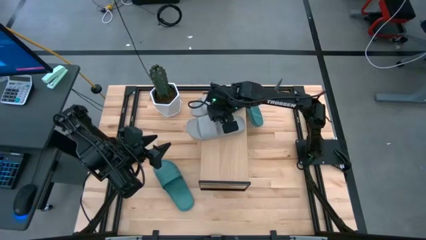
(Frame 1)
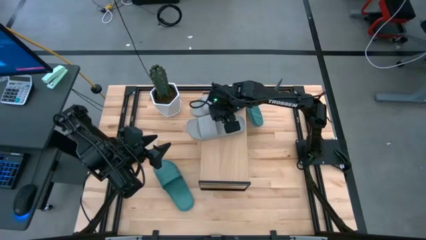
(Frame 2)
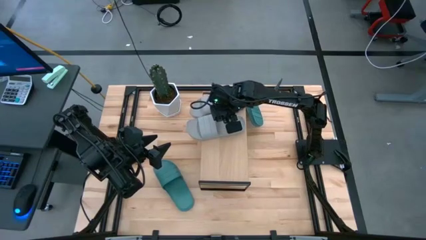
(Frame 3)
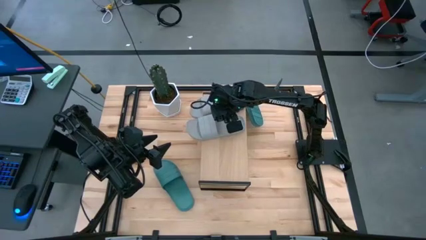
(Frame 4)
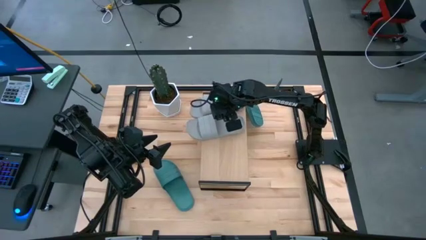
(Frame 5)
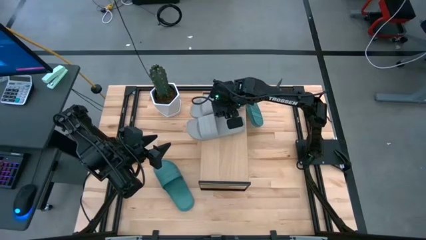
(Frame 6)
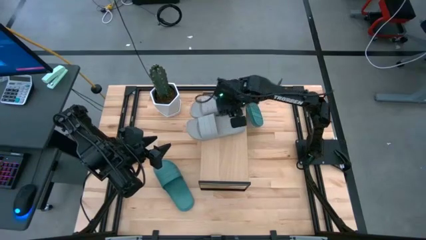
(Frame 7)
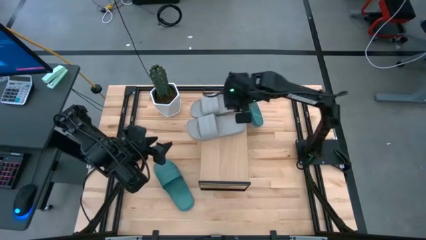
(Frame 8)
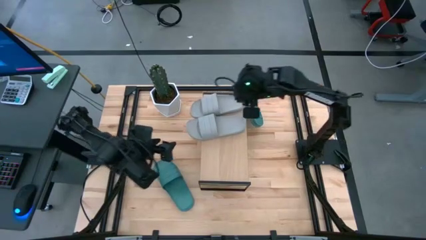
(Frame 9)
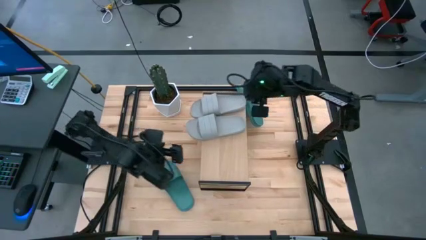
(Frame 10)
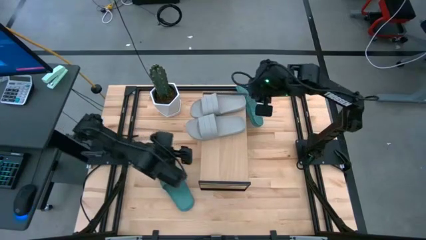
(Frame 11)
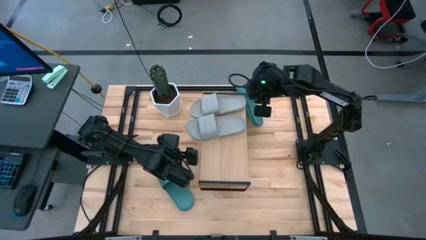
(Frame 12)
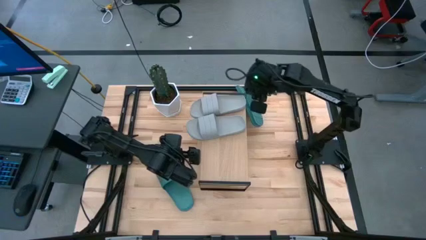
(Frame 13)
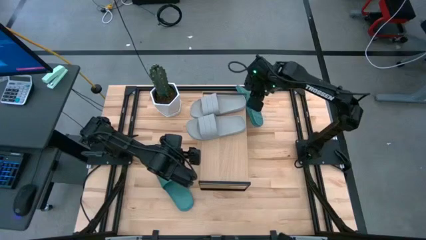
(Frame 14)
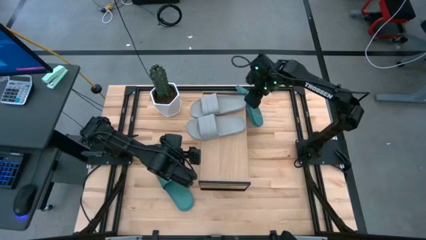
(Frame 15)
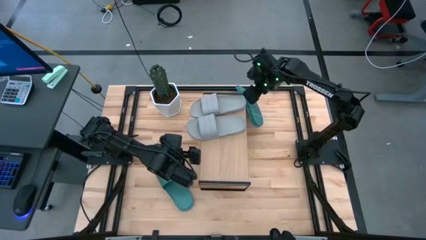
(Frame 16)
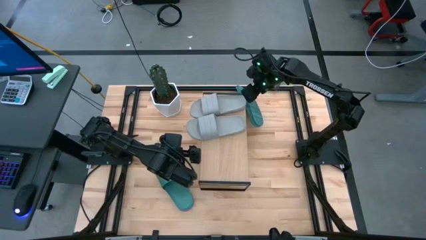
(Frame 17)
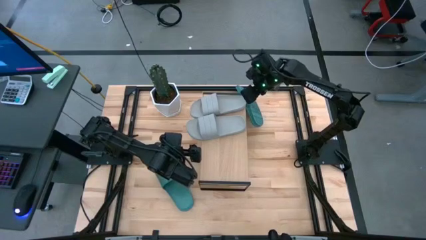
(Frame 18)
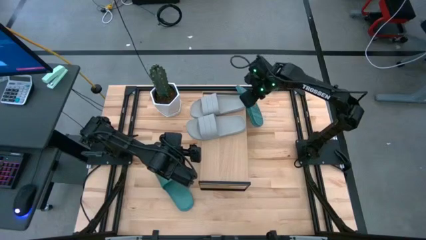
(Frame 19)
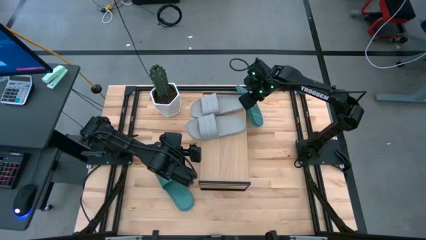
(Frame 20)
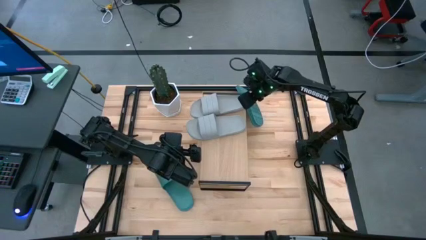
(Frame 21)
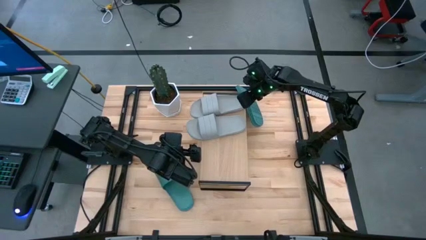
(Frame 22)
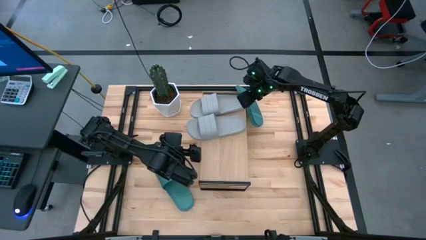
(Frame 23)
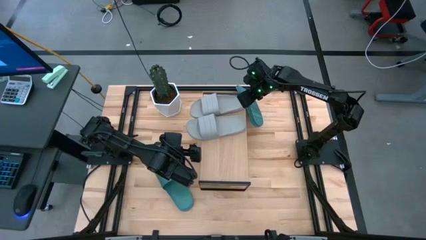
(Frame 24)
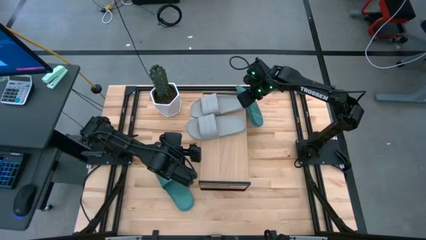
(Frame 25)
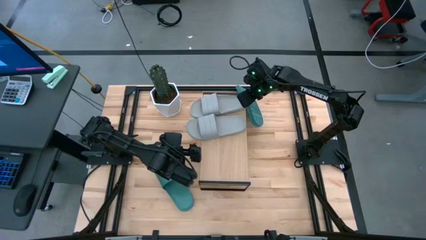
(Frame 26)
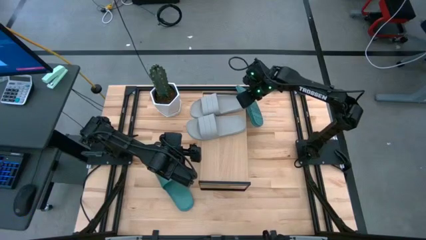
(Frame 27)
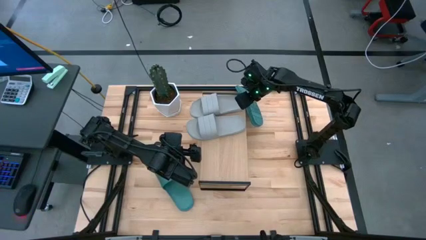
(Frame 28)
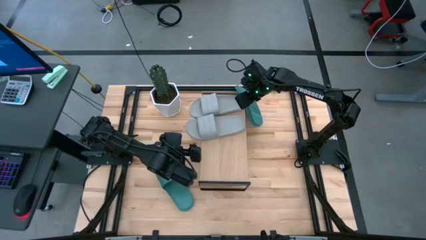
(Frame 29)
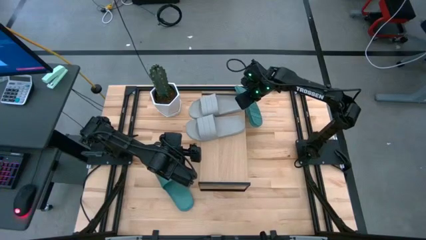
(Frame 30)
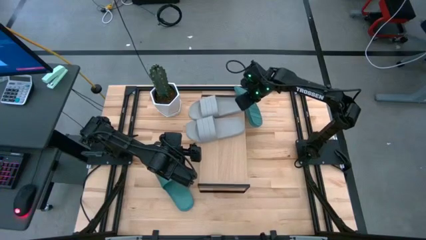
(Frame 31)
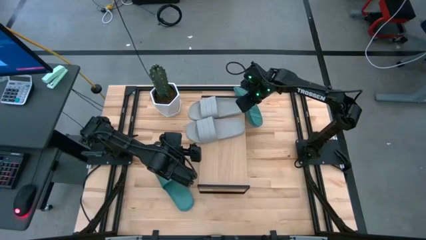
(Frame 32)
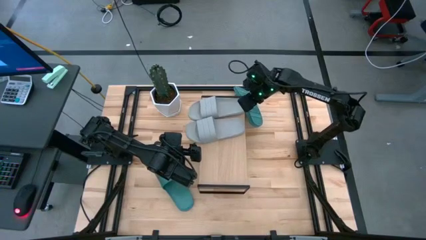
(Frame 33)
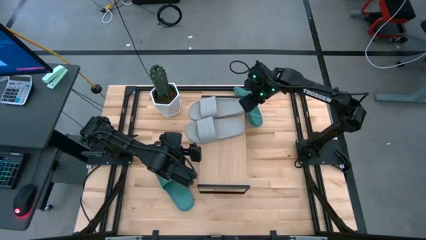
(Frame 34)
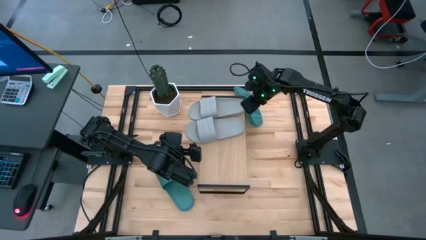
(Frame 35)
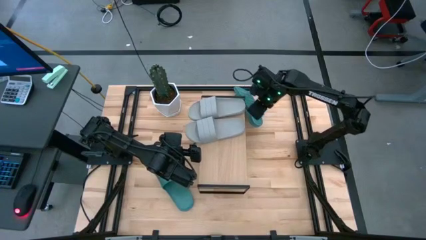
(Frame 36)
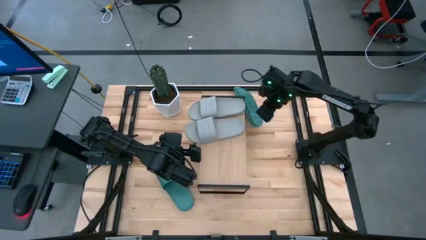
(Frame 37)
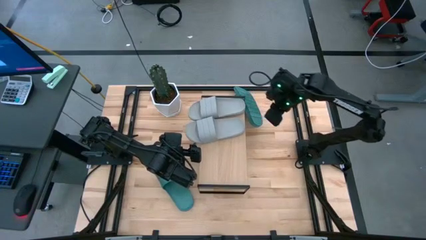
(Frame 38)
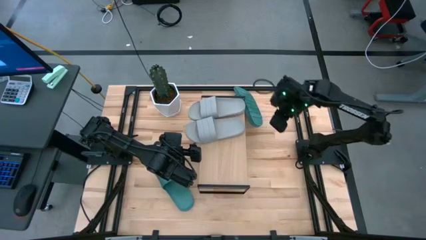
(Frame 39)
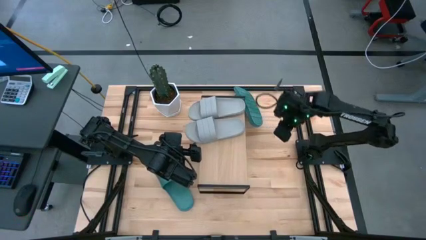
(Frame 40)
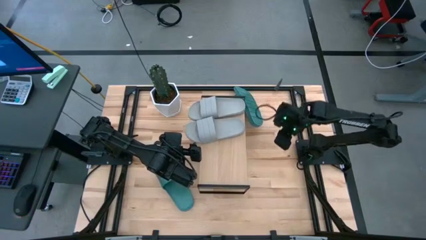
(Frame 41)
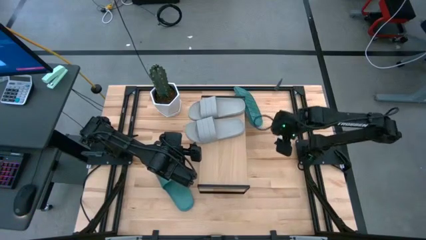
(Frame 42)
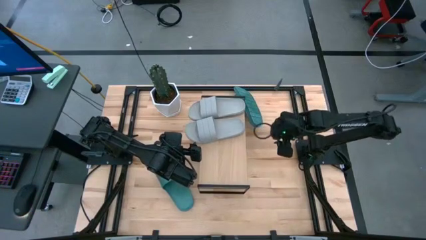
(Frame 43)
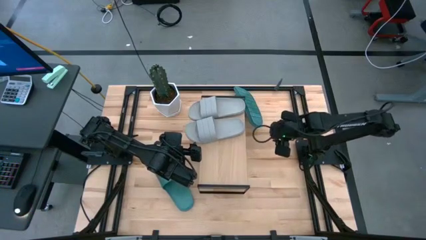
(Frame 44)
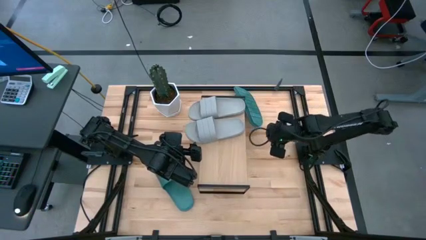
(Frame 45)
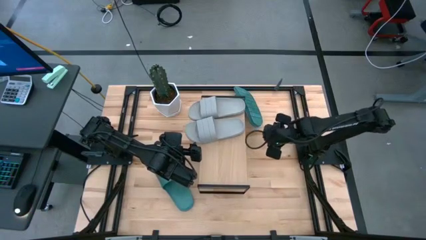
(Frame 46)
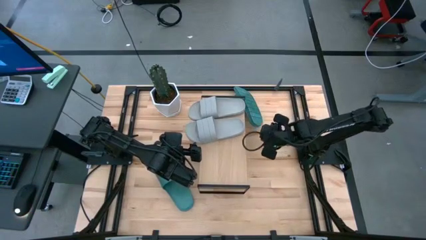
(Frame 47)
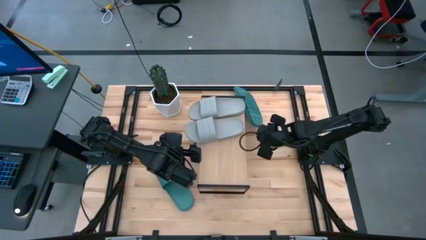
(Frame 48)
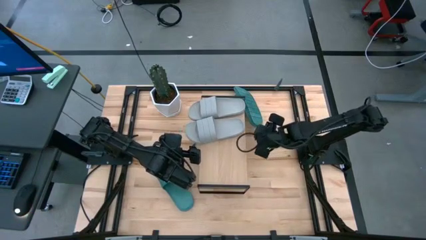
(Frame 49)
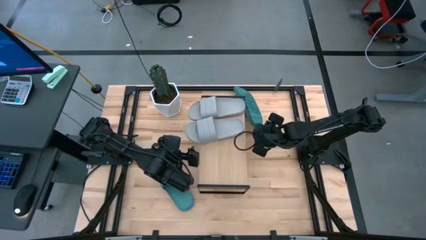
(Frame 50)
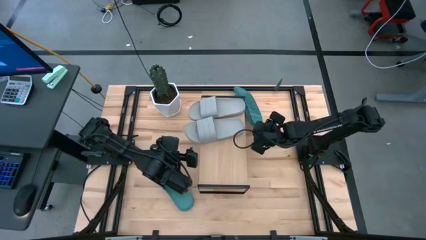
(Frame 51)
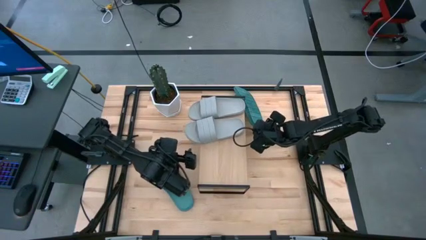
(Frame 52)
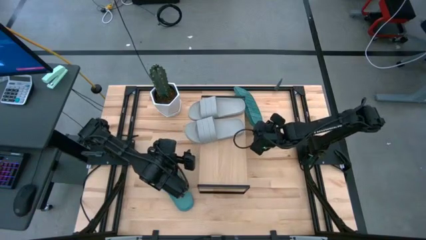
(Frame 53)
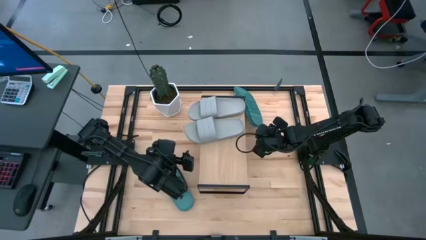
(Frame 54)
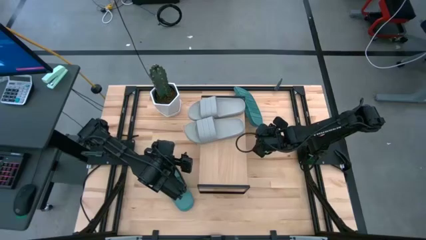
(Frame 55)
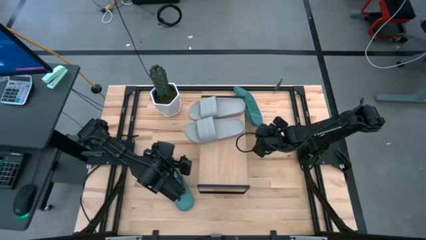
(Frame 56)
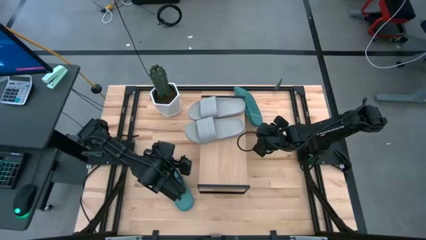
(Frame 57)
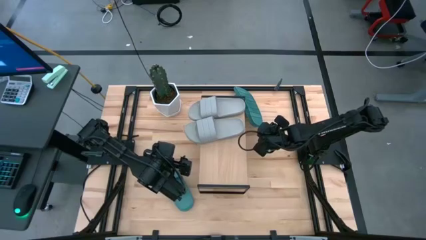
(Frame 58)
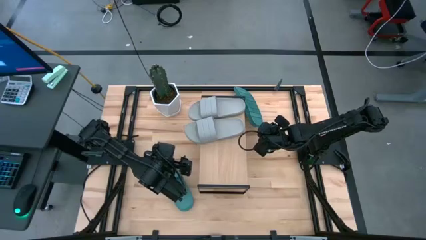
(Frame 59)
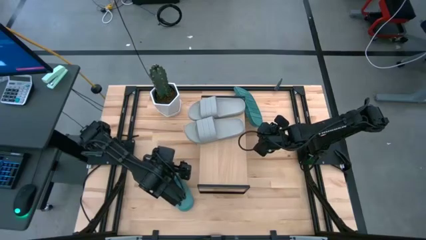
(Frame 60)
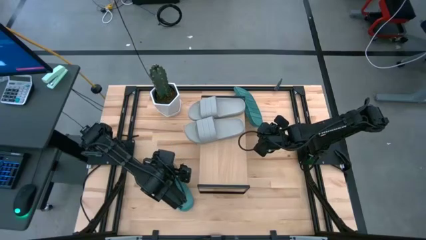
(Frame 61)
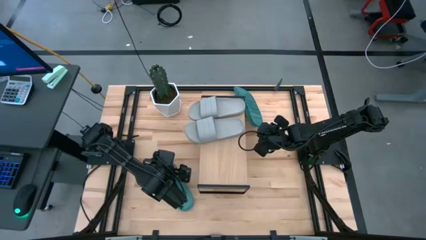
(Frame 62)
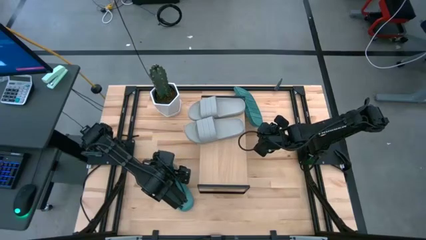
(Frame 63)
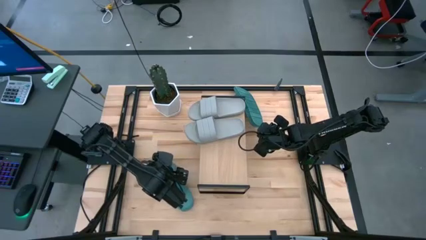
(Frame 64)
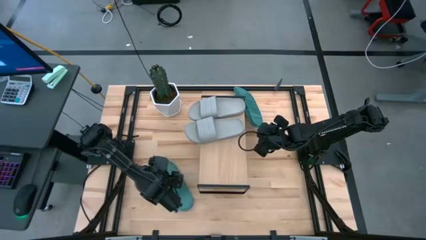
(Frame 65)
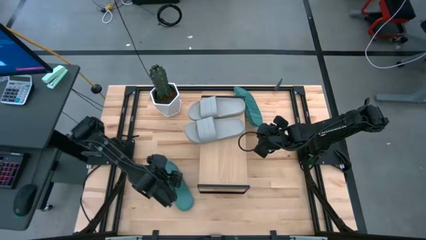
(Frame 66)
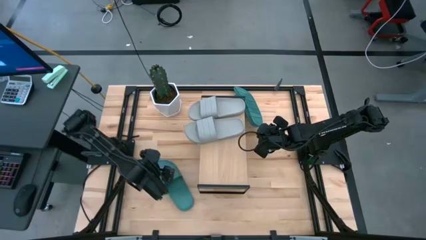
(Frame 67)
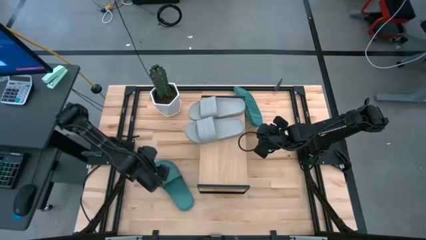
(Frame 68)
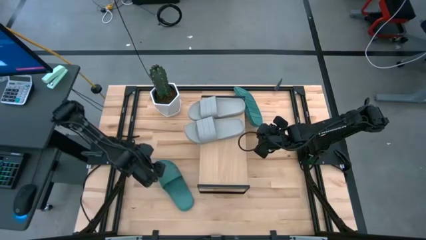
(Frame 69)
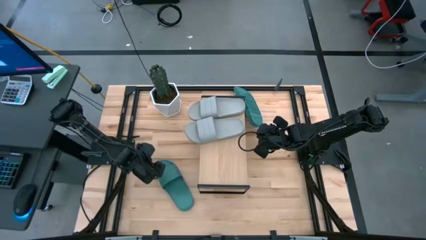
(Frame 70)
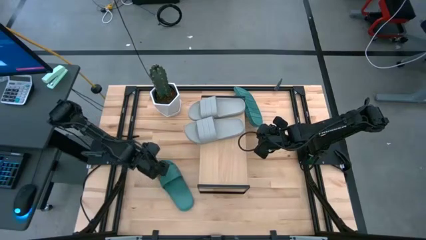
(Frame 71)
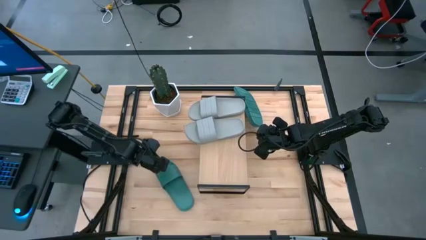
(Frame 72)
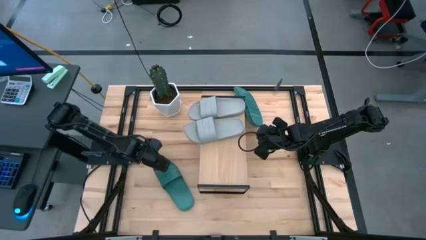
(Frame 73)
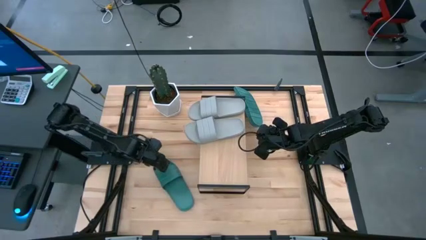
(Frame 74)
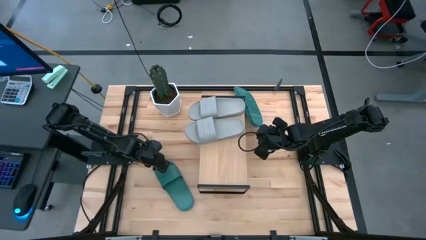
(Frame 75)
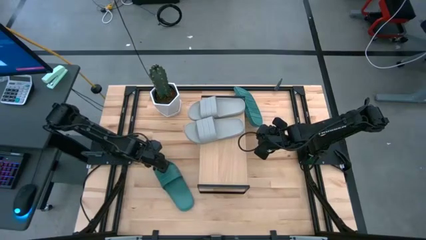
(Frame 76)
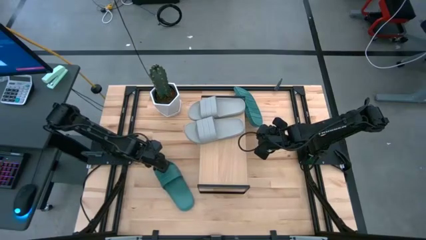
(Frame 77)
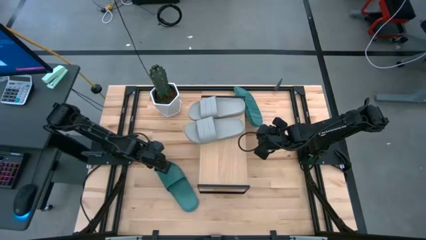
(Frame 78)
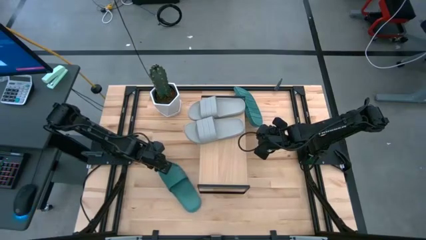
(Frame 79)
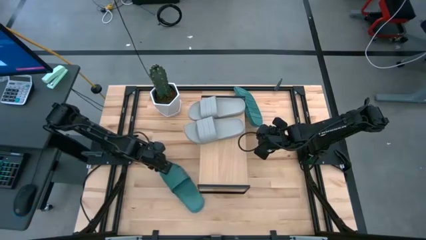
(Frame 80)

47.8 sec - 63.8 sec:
Task: Pick and place slides into the shelf
Put the bottom green slipper on the shelf
